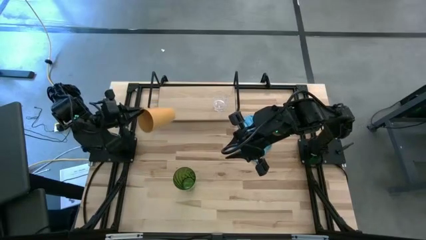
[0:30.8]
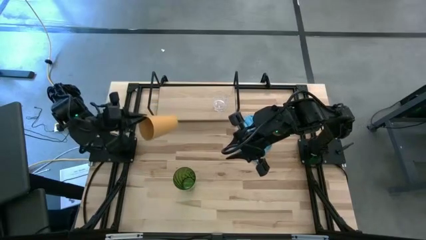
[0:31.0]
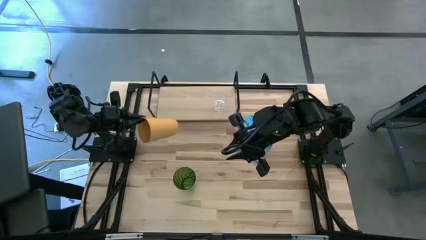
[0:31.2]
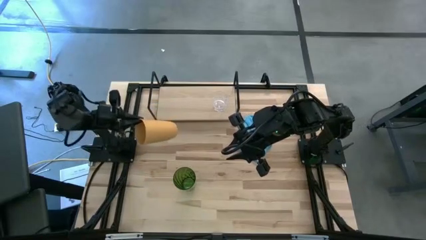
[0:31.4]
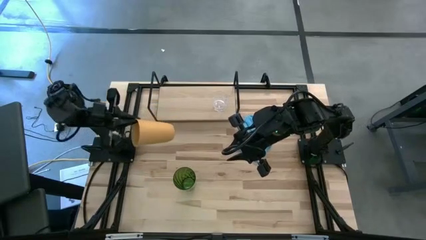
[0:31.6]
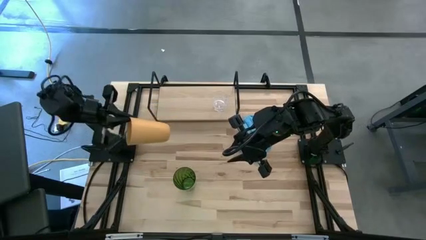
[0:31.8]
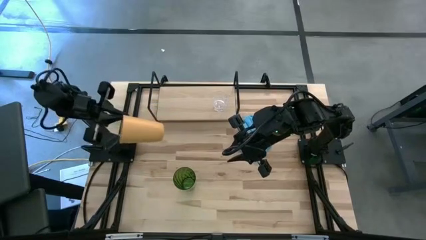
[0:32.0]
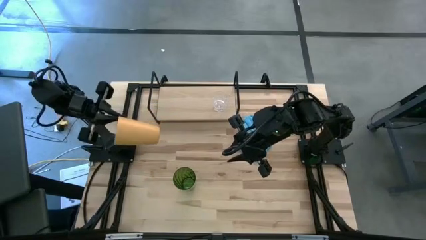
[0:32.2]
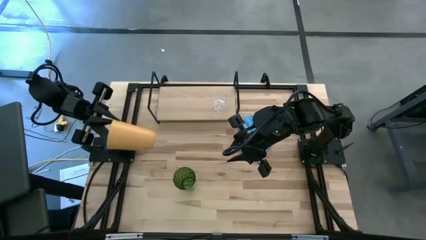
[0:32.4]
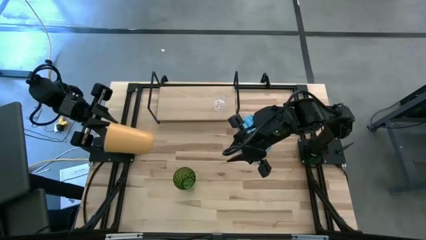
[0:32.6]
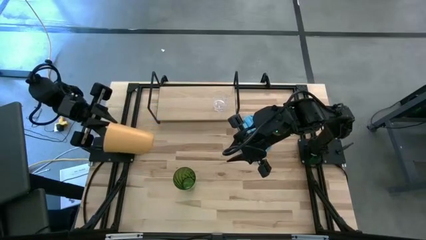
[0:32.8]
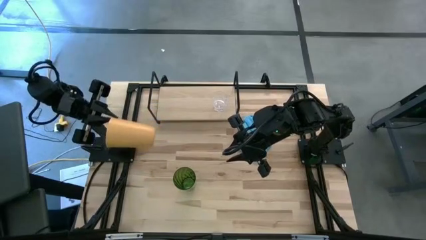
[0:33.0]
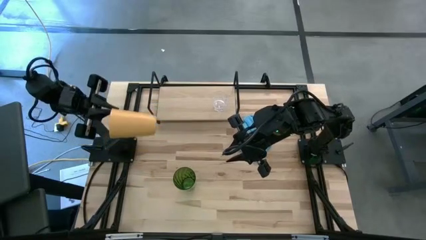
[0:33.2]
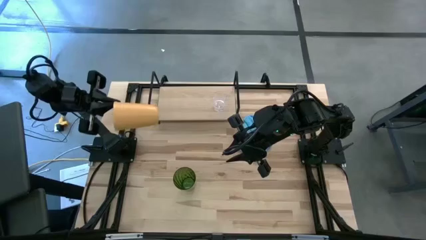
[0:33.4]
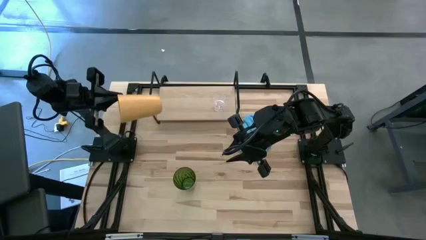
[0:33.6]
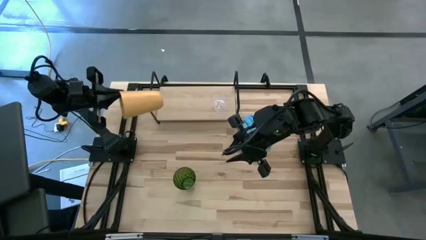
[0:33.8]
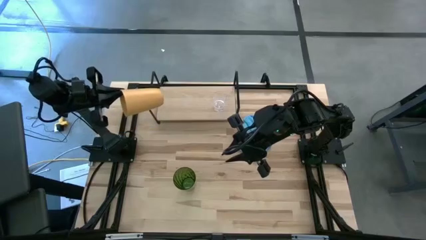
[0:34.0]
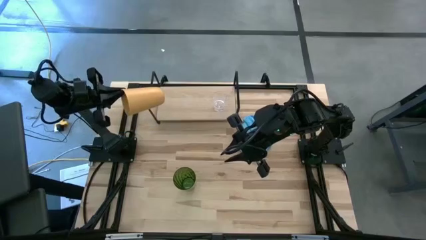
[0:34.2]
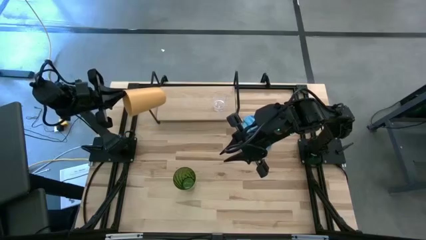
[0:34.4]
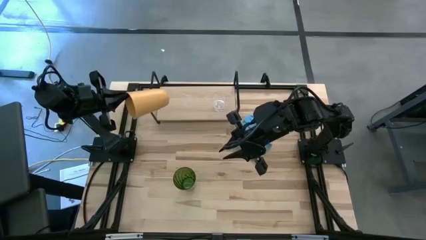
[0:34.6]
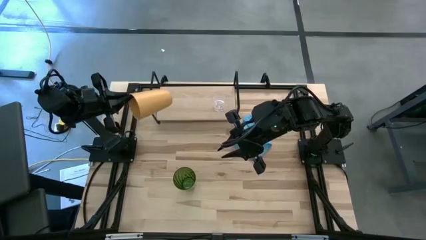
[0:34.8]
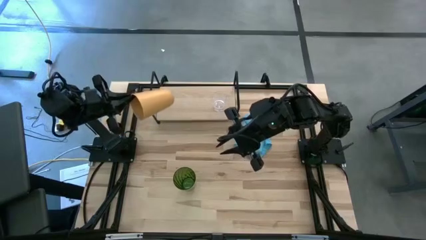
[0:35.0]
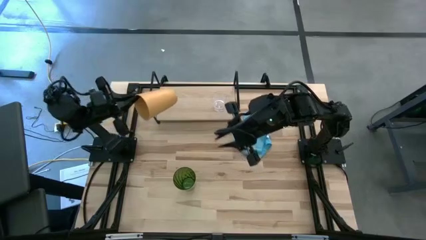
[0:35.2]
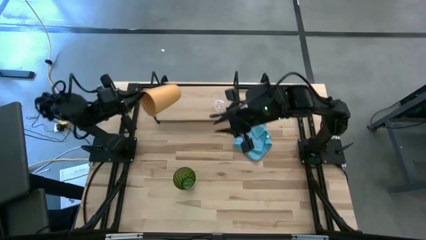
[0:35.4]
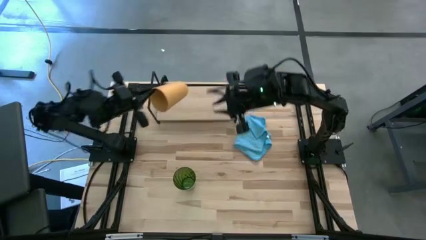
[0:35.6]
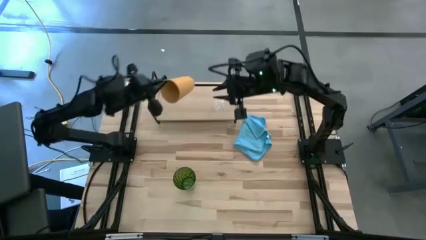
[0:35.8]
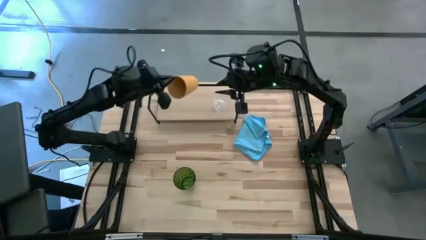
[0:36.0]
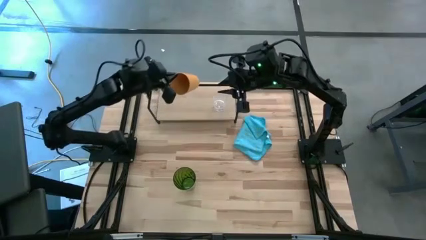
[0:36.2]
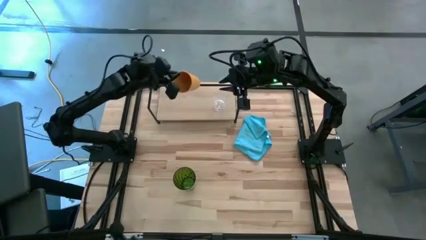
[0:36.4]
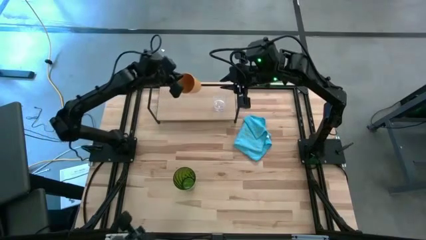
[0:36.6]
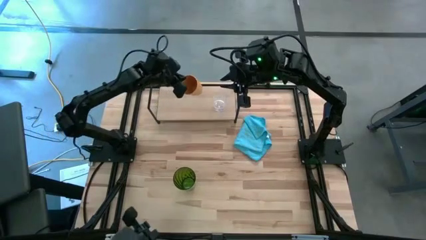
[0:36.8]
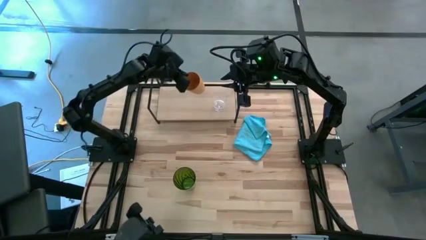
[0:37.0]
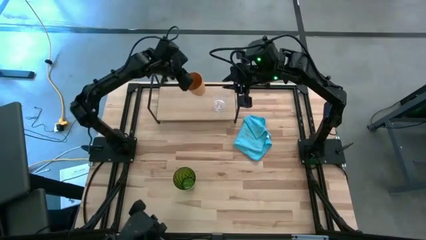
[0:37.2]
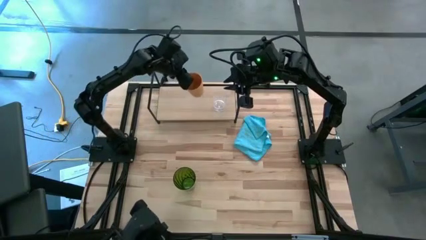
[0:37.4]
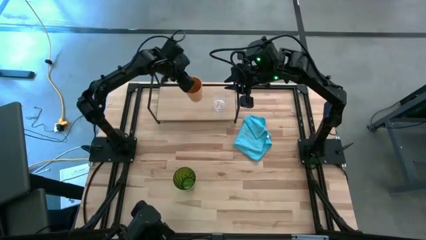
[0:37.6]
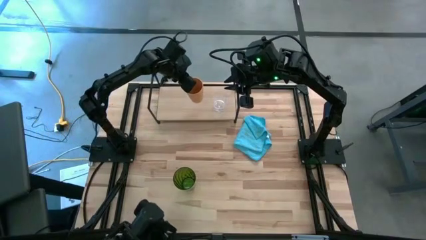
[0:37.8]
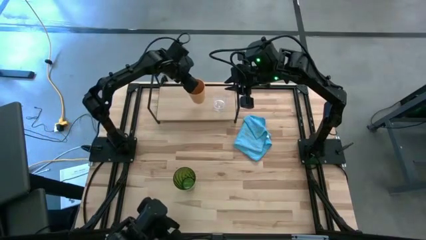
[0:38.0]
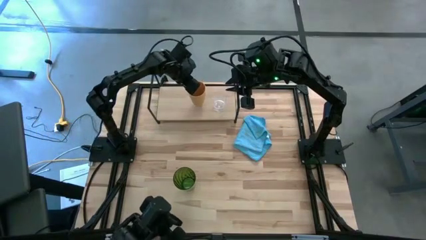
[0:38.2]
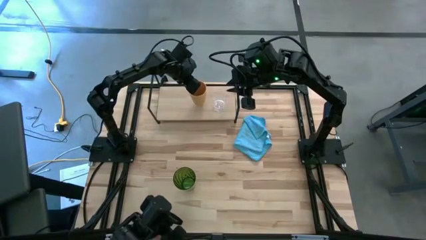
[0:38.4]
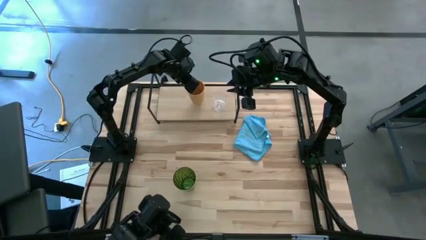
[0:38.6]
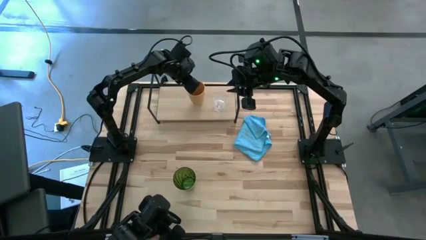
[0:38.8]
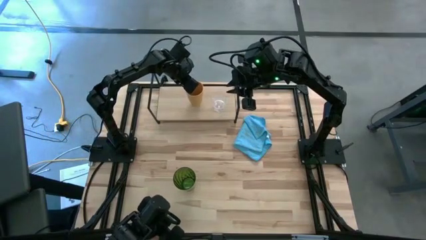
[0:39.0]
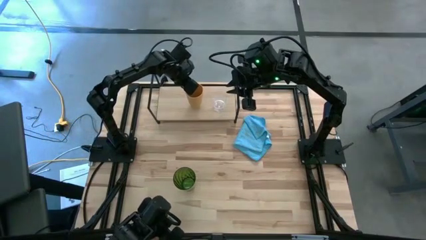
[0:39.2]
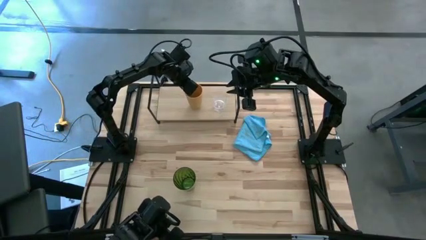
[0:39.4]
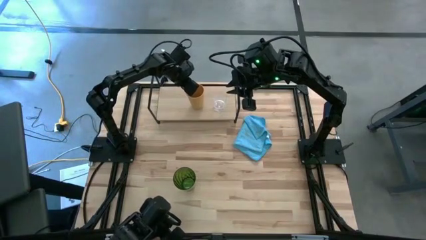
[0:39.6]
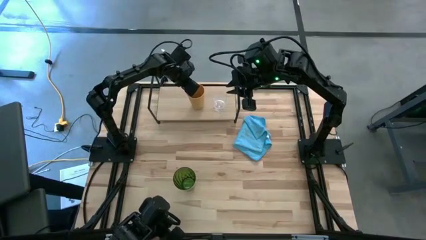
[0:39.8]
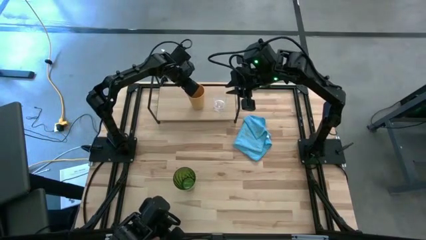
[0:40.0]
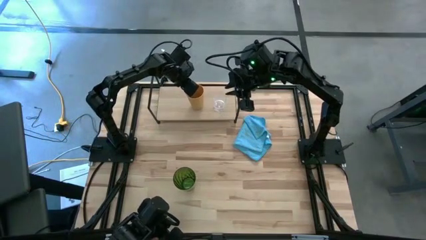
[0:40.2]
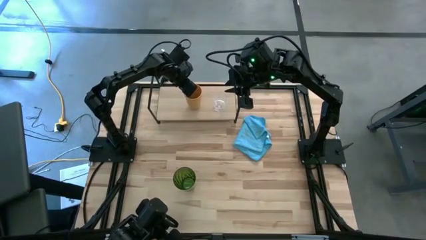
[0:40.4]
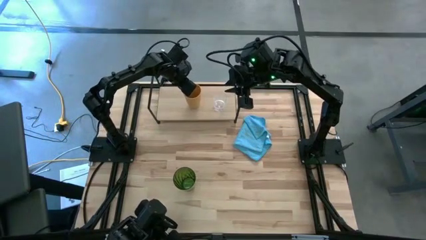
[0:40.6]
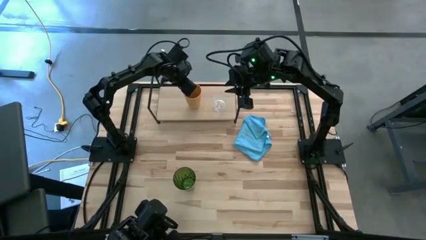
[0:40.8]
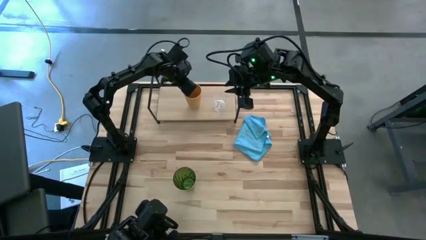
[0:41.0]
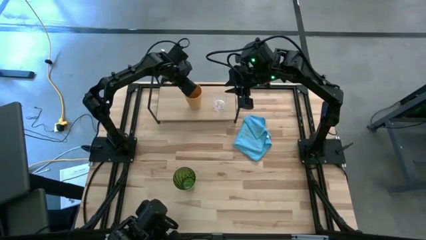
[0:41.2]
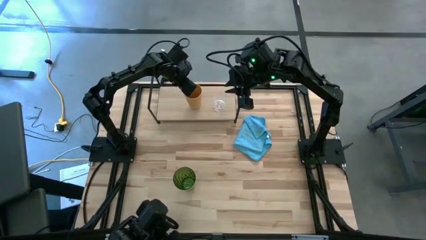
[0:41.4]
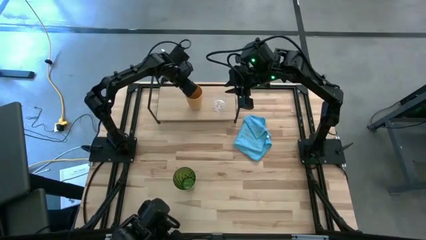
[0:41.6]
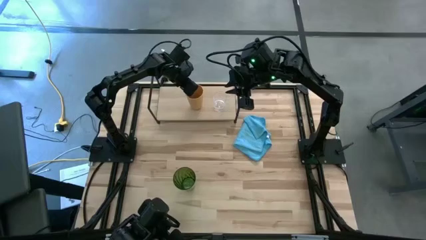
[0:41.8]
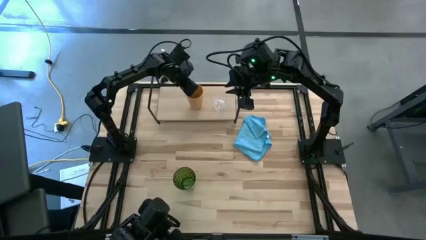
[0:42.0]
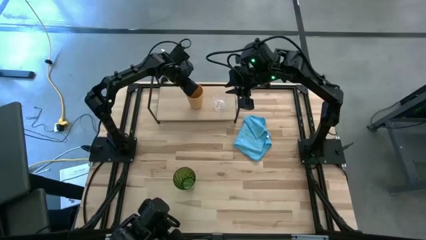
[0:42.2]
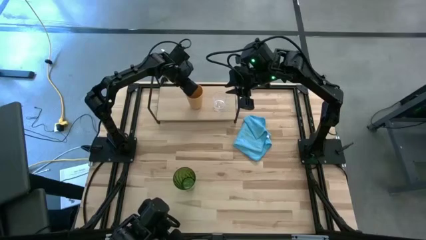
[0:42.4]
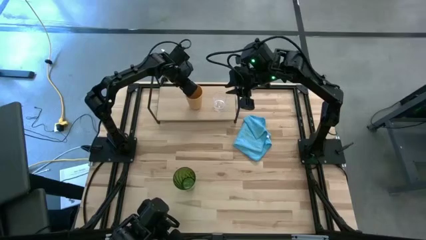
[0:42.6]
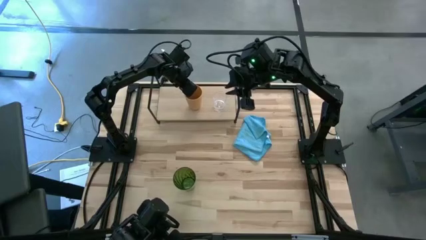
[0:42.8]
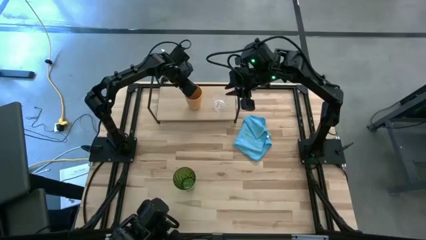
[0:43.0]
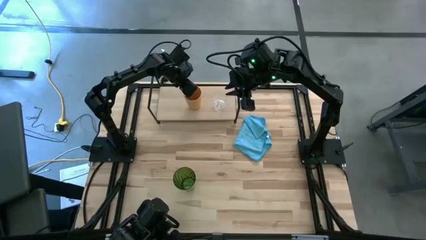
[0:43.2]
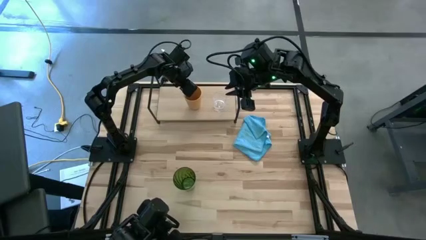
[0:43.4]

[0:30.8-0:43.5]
Task: Stack small to large cups/mugs on shelf
Put the yellow cup on the shelf

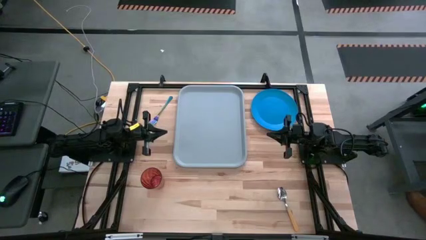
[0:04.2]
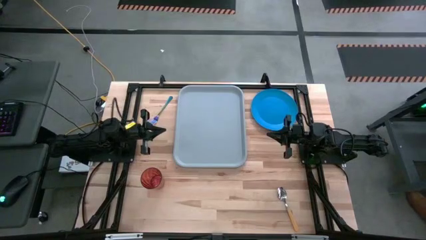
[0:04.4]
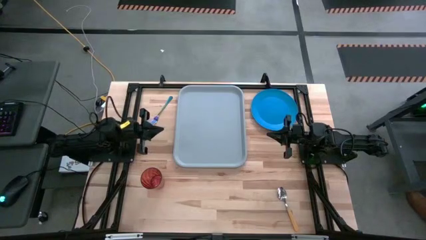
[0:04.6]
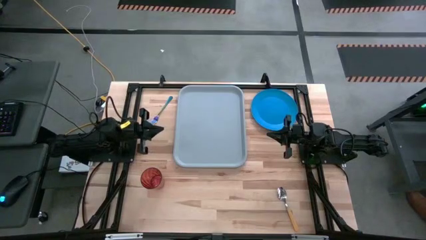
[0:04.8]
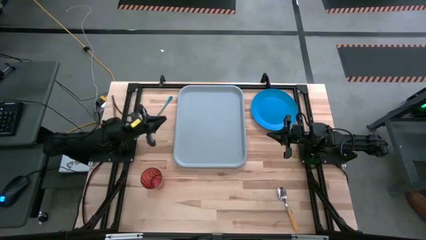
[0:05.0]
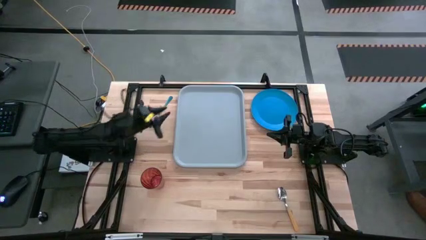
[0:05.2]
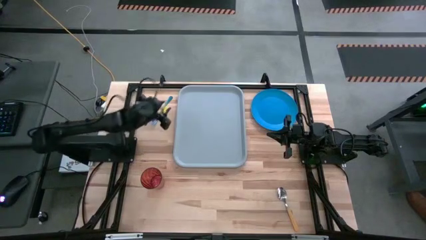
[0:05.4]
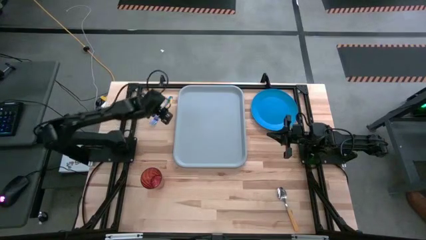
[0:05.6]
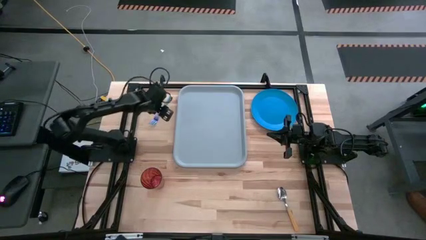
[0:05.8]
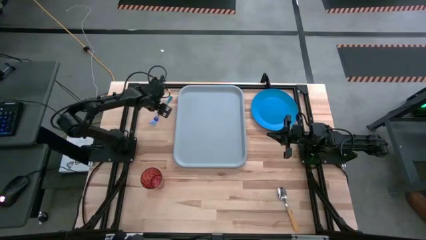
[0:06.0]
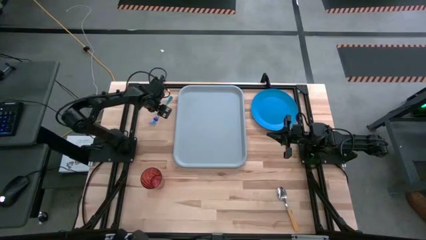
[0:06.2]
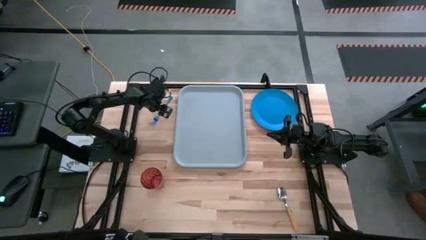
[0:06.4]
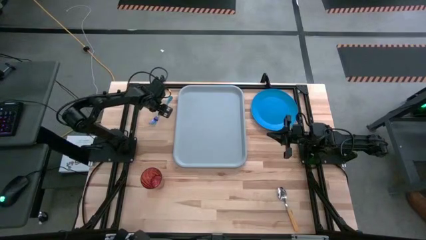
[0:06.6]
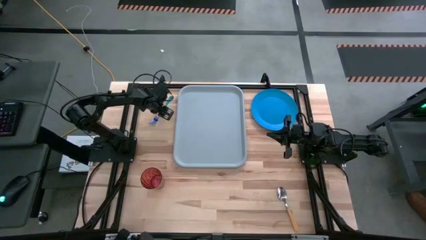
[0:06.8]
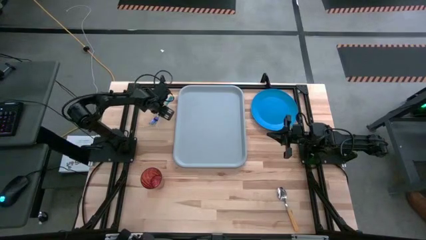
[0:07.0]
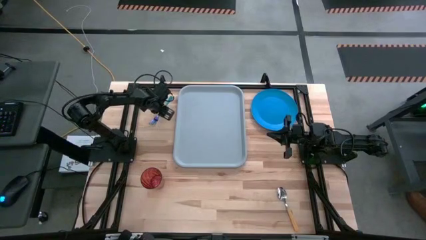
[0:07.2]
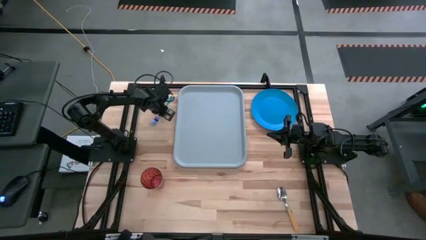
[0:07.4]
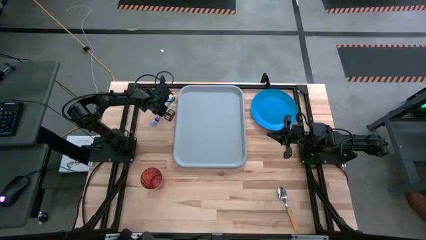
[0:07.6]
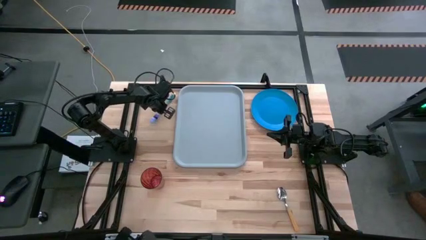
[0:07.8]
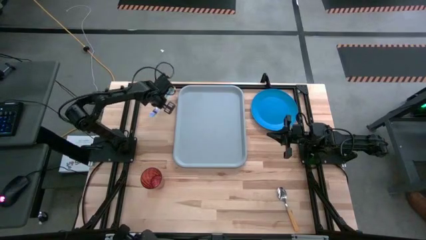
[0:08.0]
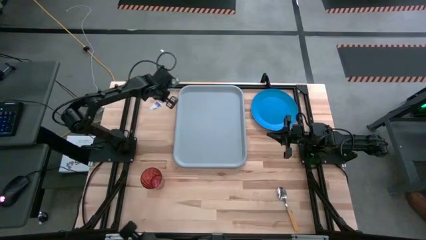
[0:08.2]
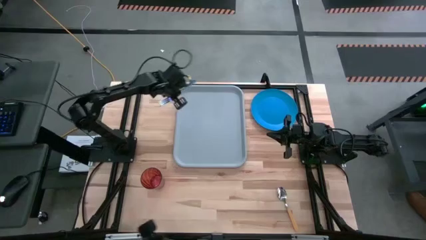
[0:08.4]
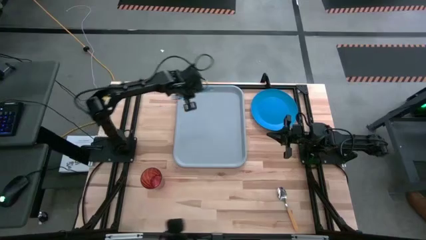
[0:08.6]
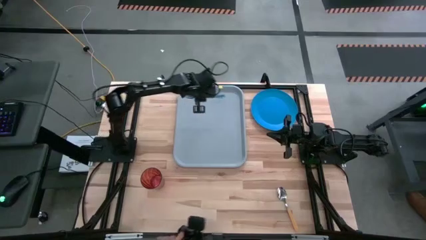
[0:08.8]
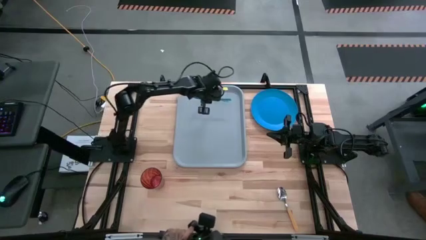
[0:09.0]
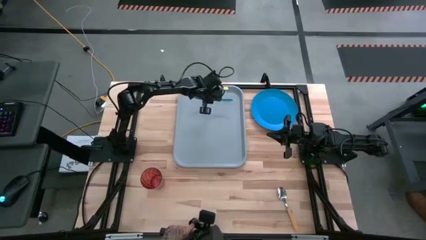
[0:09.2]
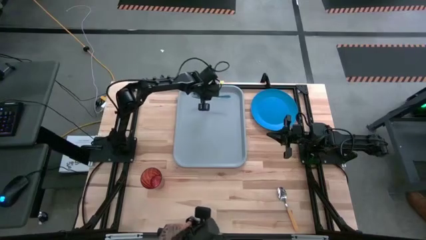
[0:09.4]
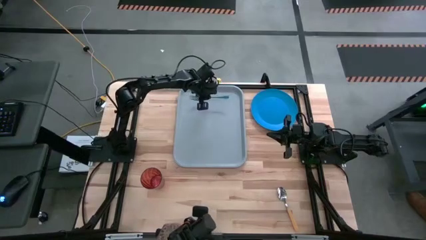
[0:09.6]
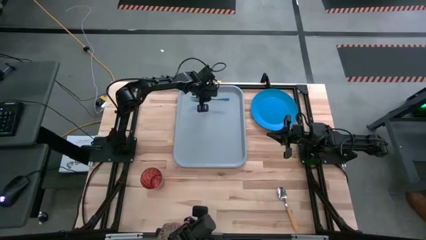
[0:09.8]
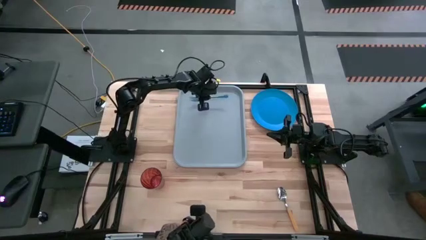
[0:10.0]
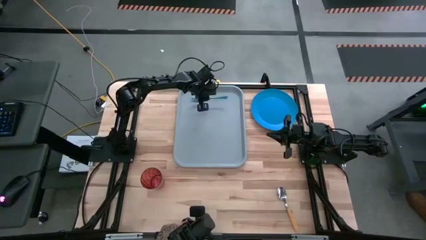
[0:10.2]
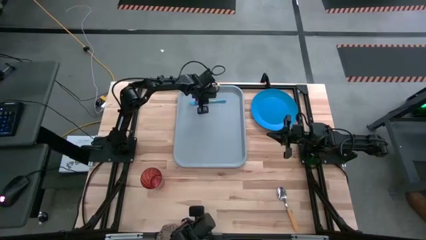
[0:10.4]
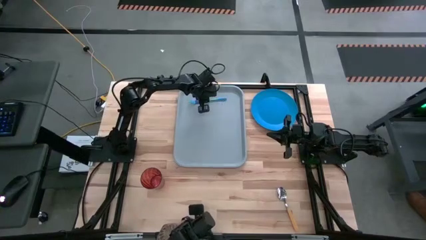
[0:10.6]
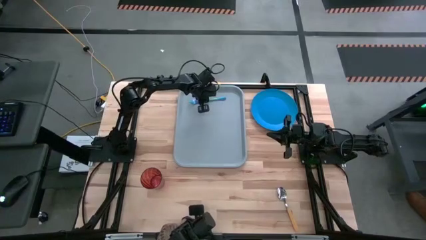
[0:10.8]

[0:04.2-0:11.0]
Task: Pick and place plate/cup/fork/spoon on tray
Put the blue fork on the right of the gray serving tray
